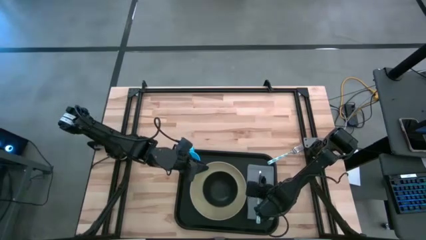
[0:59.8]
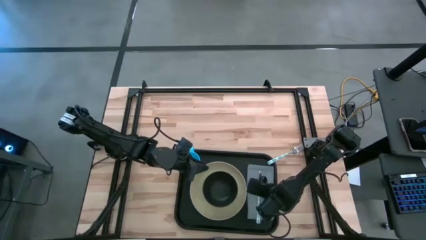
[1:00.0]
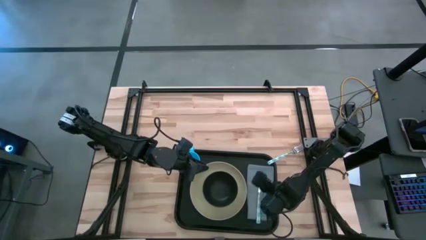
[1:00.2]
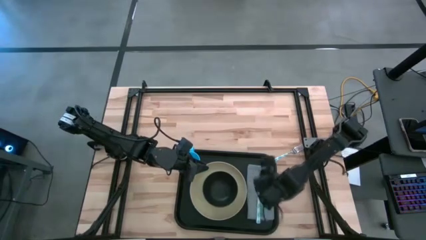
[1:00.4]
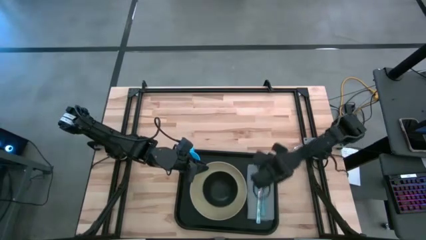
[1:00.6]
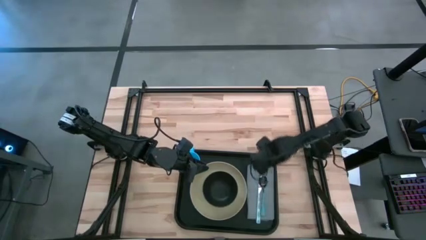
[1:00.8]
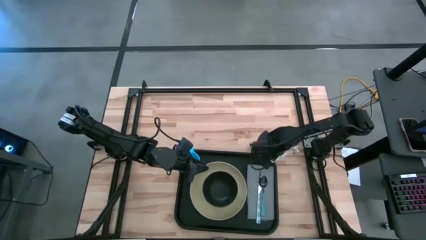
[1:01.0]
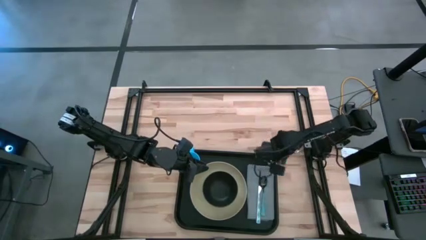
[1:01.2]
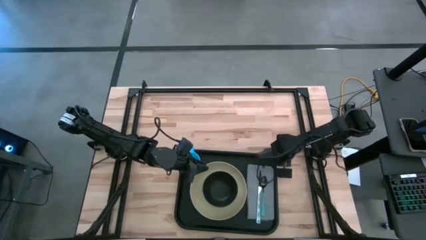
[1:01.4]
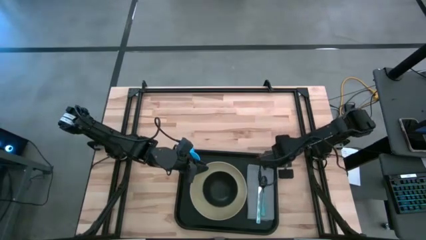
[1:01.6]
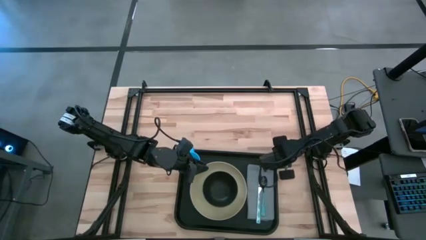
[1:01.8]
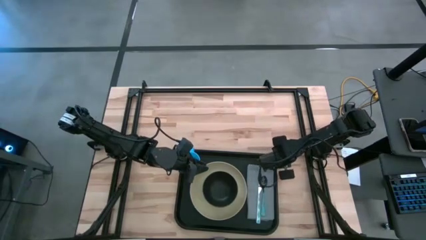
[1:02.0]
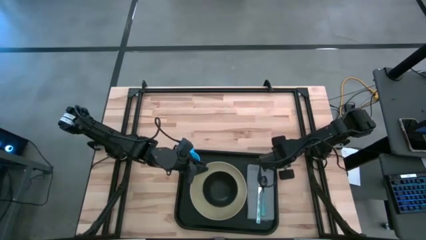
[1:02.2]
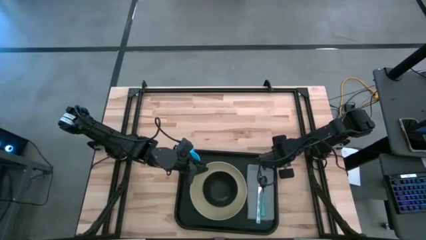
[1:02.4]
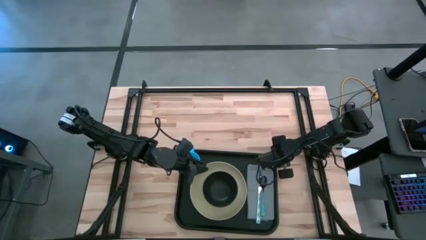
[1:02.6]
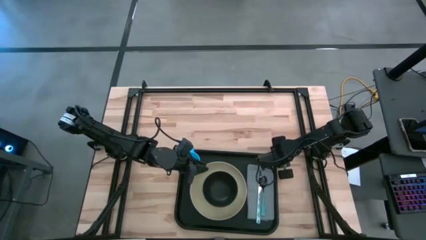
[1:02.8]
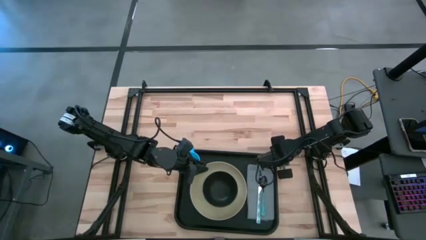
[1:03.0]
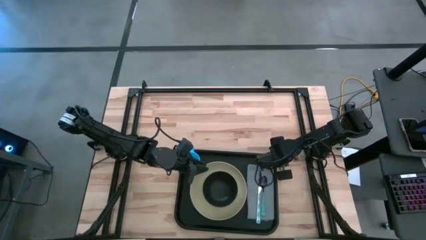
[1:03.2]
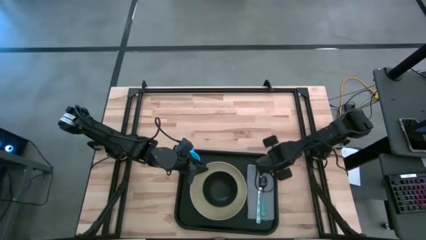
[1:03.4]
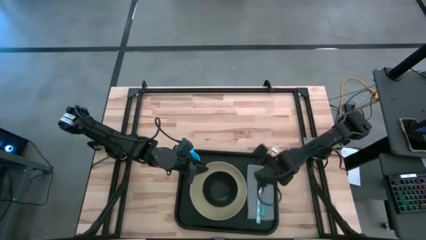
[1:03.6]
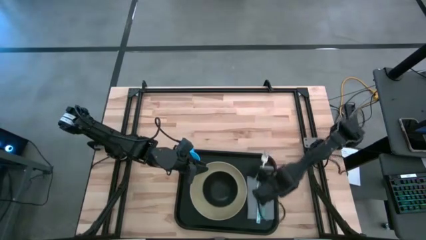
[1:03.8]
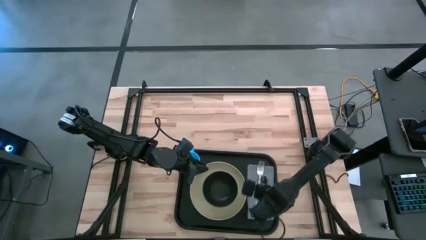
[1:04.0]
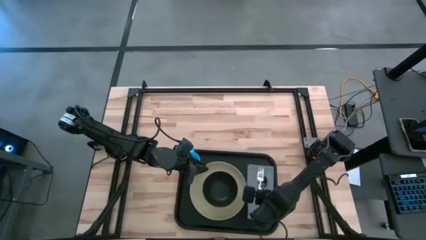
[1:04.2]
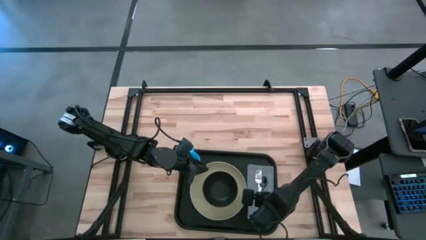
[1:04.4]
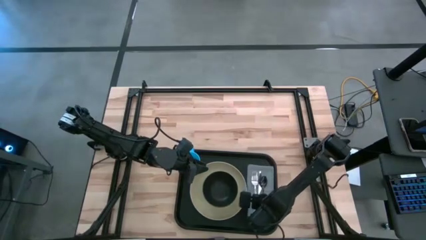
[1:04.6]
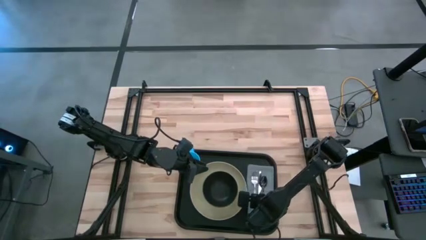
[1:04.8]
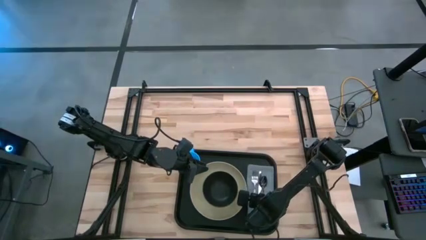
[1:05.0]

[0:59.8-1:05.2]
Task: Set up tray
Put the white fork to the left side of the white knife on the gray napkin on the black serving tray

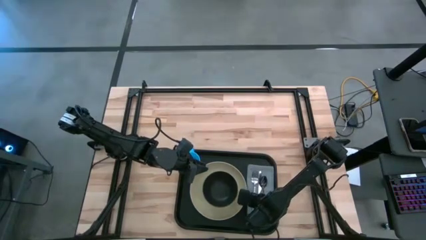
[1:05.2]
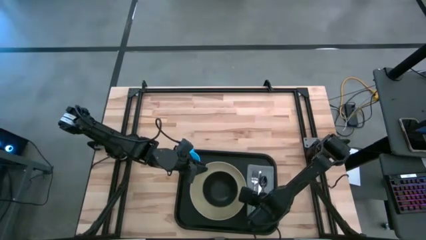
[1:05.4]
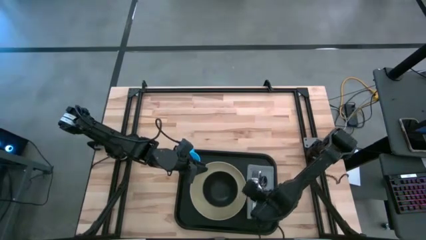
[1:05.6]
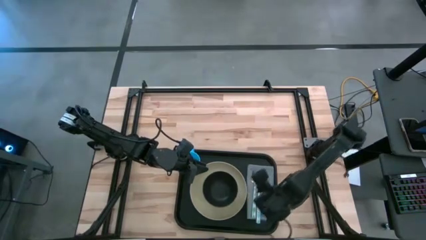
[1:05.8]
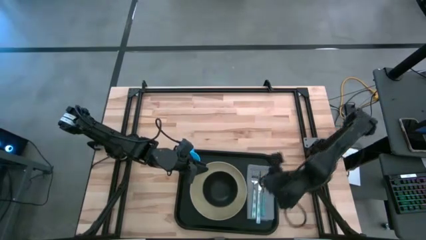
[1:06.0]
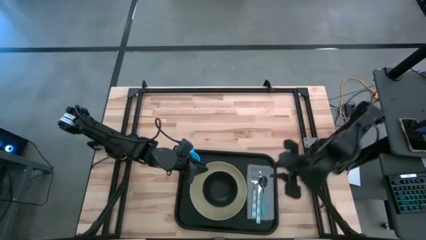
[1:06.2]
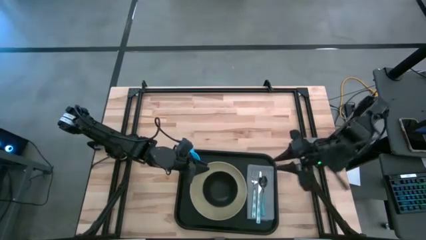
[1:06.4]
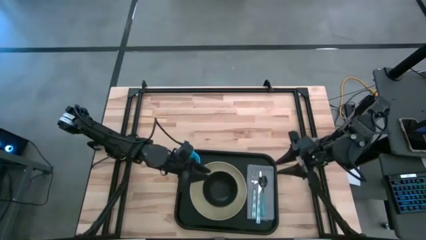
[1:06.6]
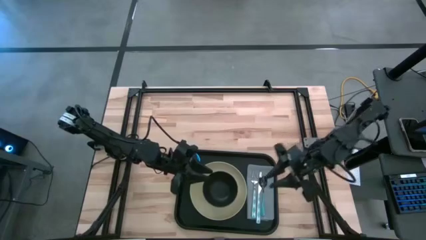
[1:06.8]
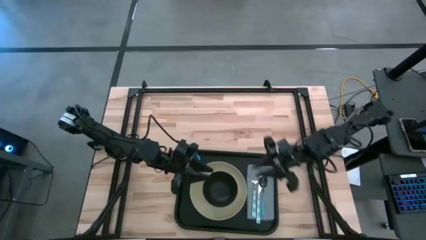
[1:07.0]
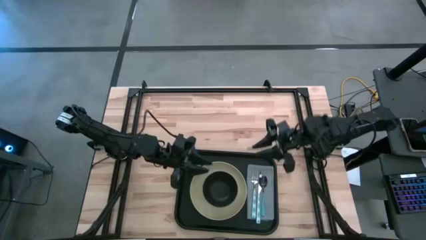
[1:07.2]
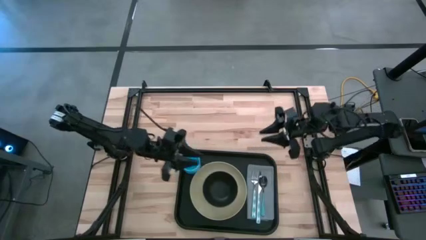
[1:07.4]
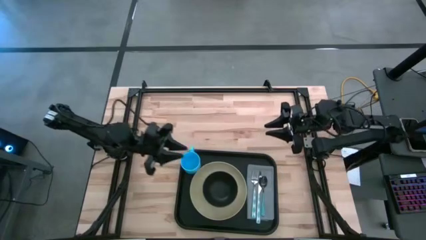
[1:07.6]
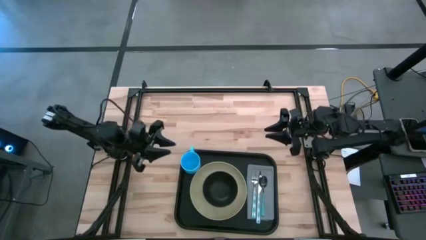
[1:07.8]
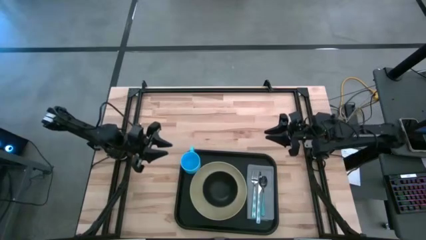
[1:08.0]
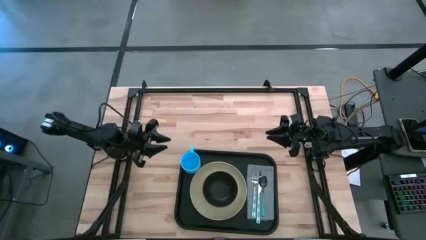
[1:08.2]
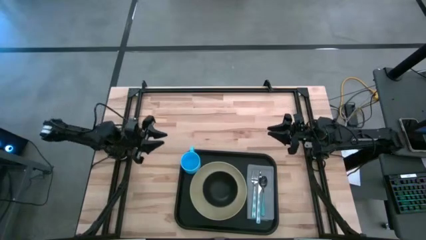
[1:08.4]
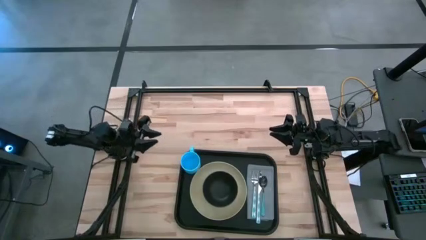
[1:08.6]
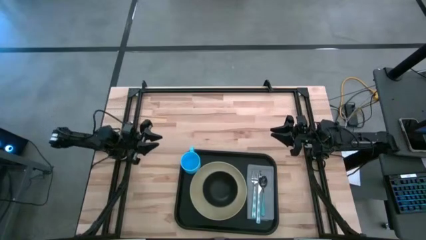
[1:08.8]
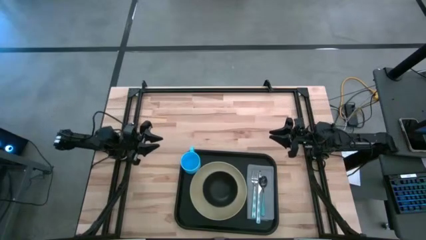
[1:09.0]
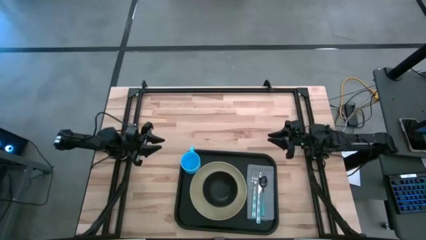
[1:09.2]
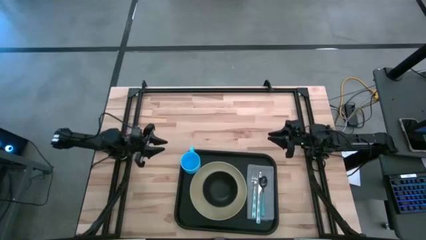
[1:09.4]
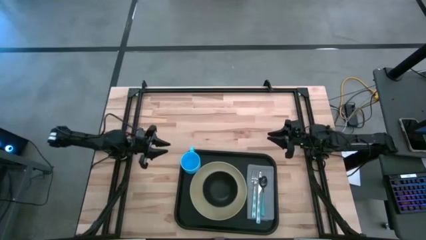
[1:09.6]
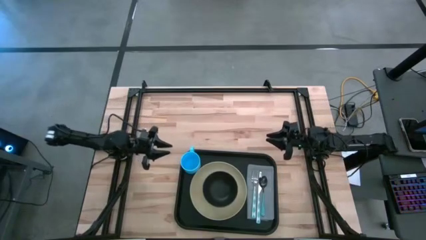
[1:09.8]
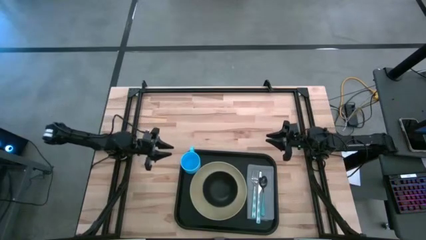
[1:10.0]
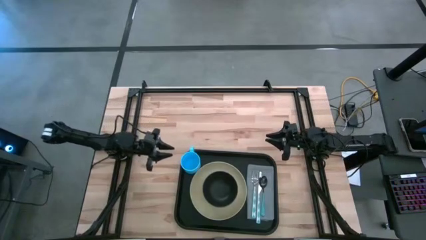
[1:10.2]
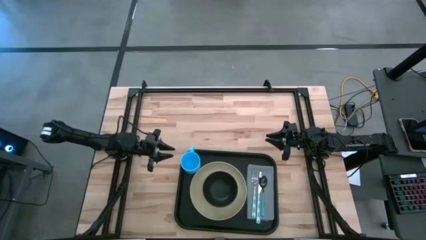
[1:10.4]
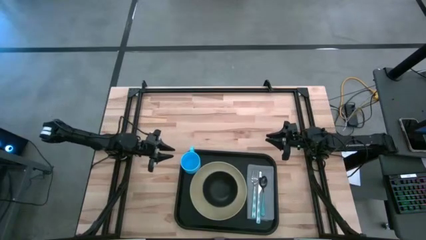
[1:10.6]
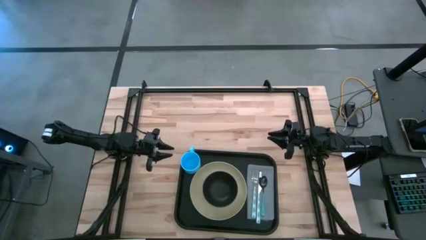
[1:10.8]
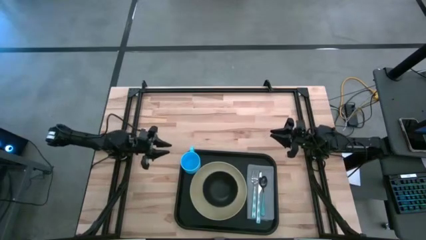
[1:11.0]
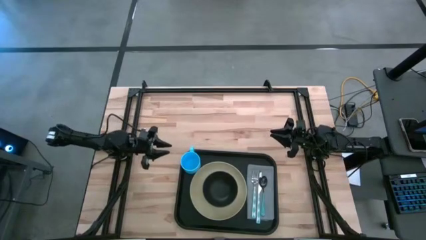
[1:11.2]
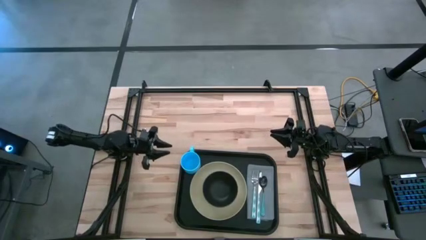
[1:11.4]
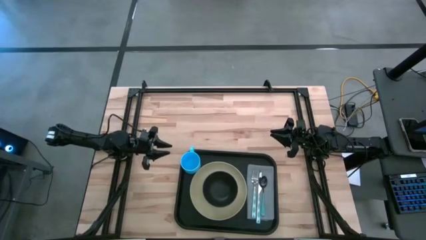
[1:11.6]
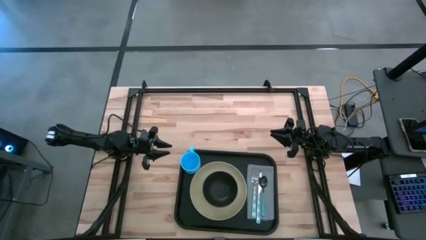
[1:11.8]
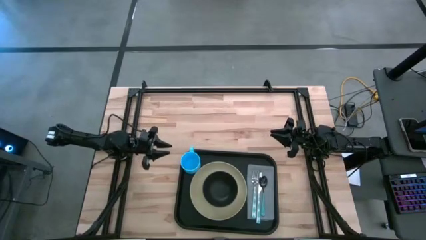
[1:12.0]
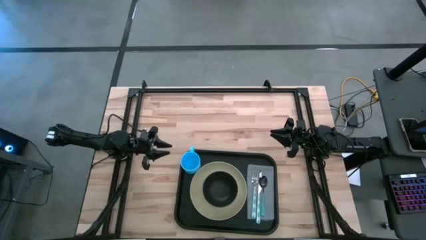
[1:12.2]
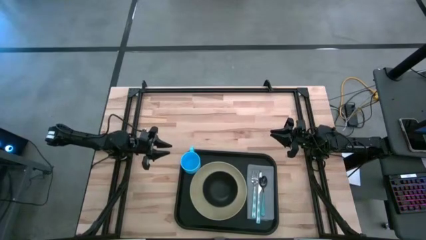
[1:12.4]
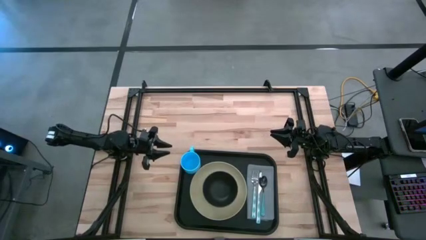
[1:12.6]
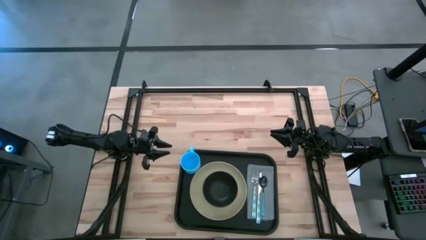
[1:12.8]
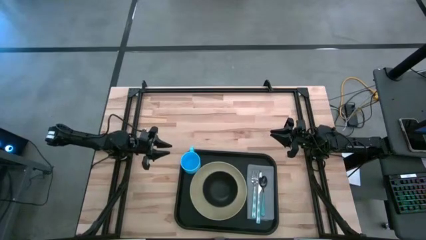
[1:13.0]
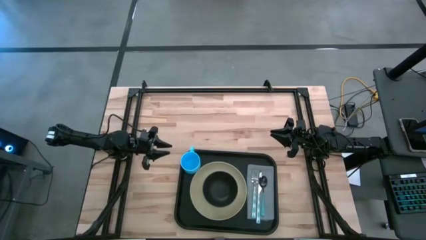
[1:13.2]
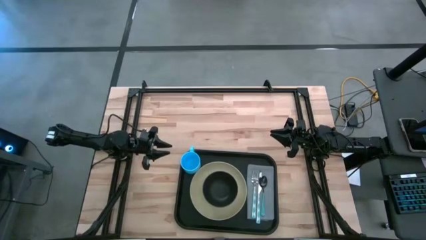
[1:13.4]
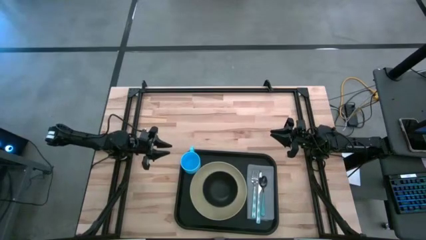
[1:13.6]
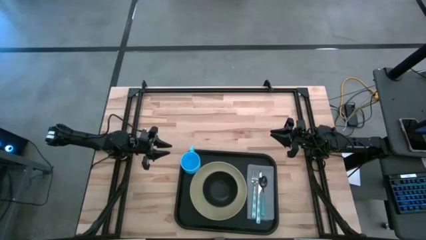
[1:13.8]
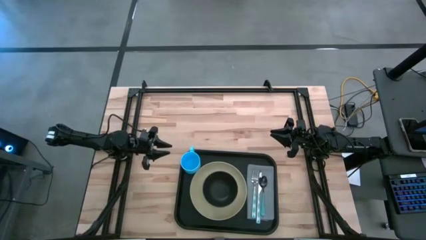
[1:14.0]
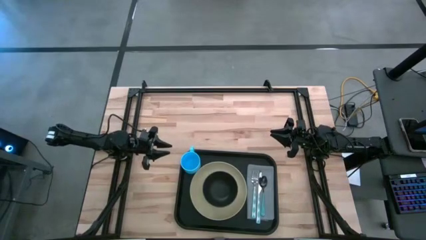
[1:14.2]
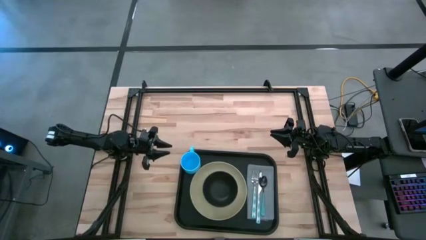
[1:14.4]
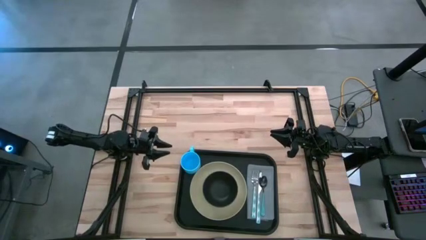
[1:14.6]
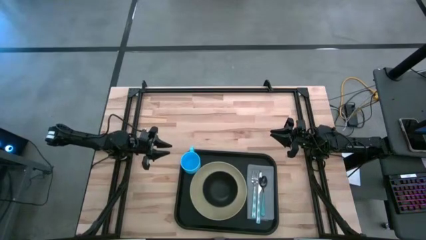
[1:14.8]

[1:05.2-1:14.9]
Return to Home Position
